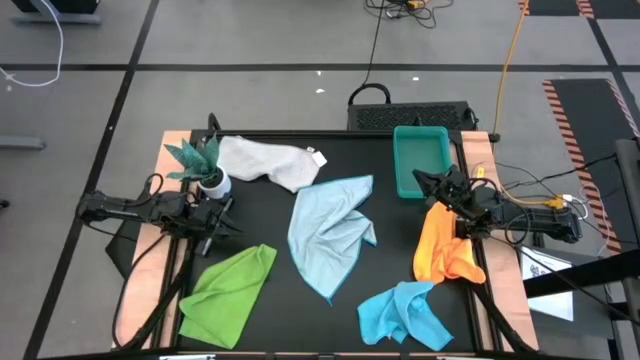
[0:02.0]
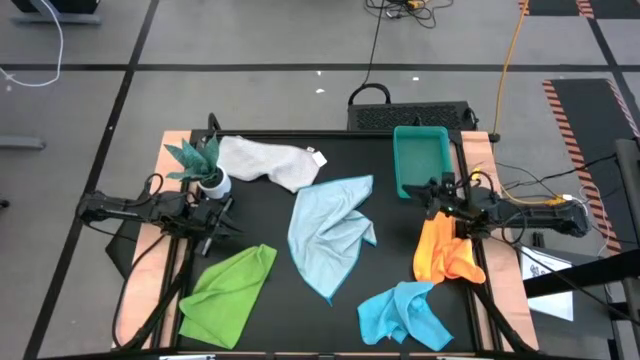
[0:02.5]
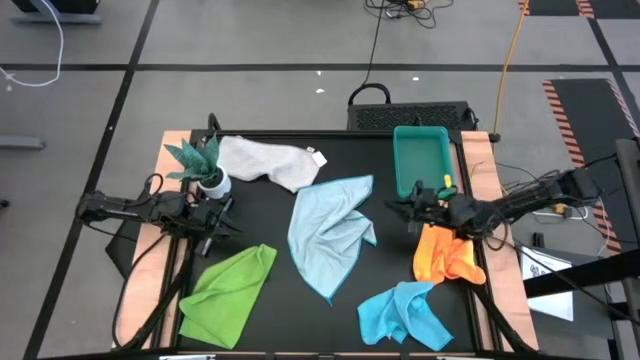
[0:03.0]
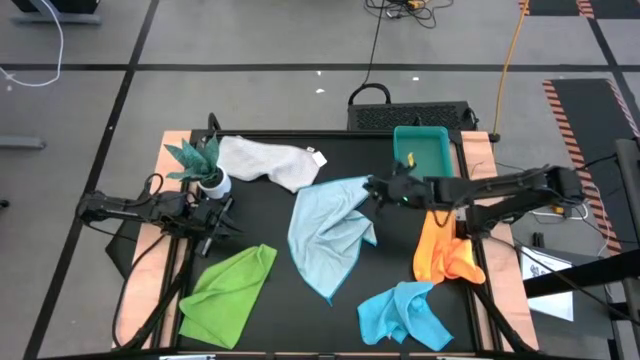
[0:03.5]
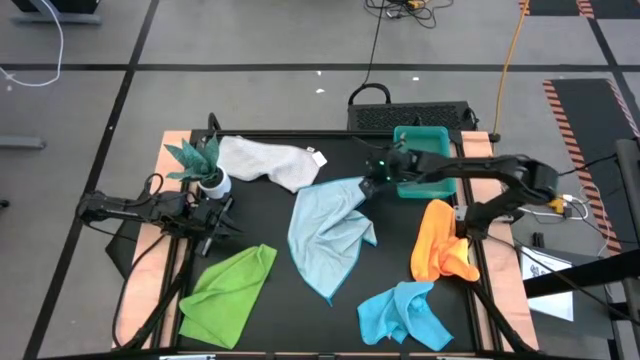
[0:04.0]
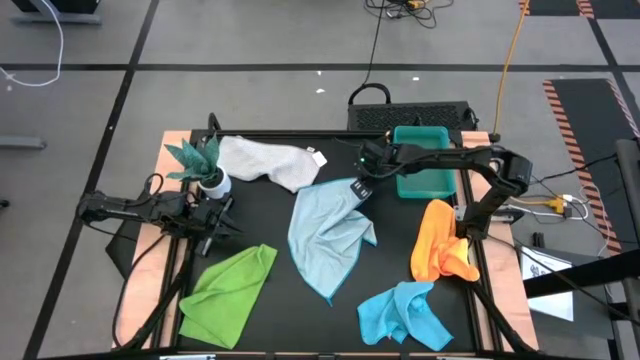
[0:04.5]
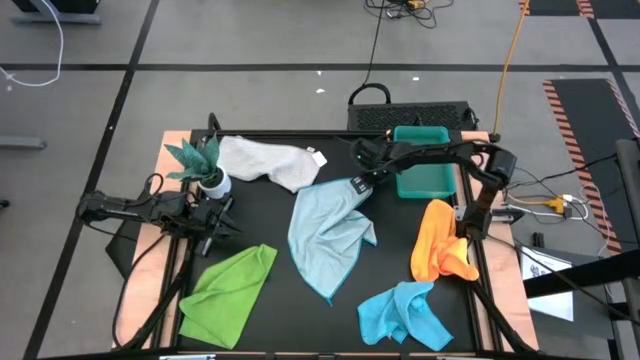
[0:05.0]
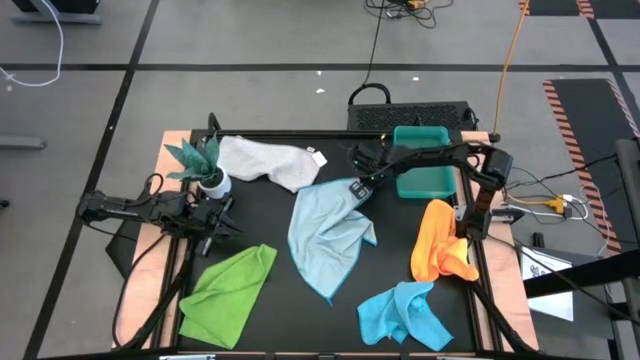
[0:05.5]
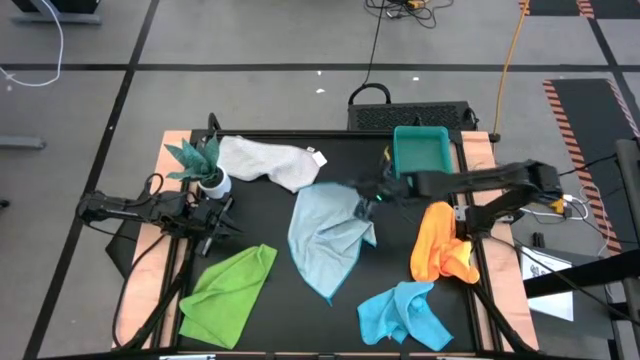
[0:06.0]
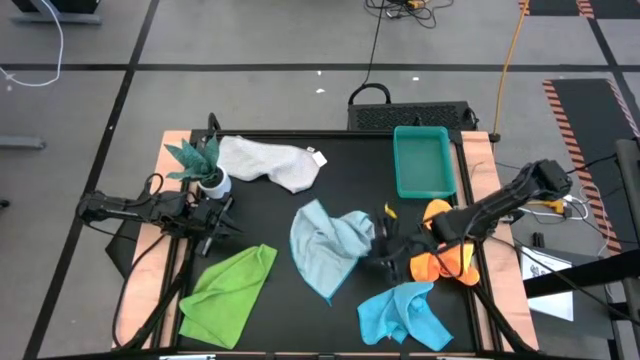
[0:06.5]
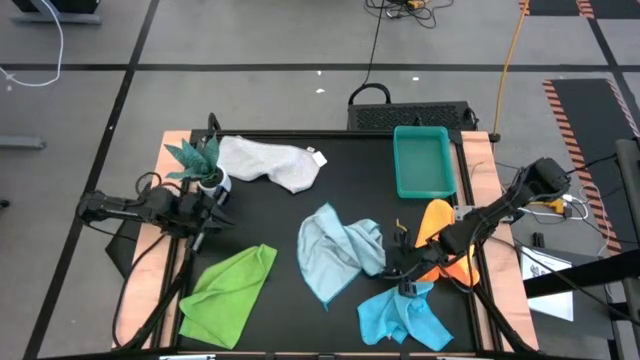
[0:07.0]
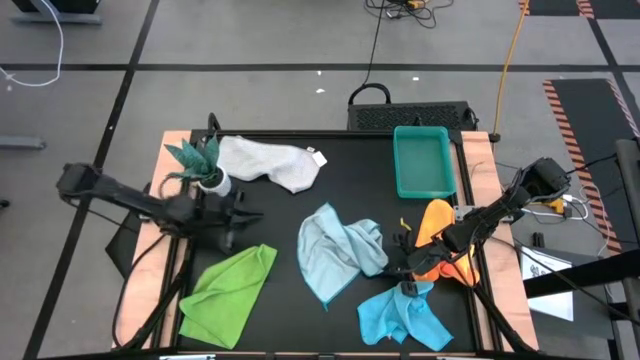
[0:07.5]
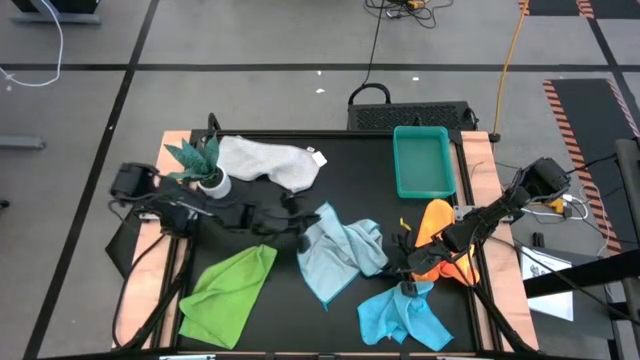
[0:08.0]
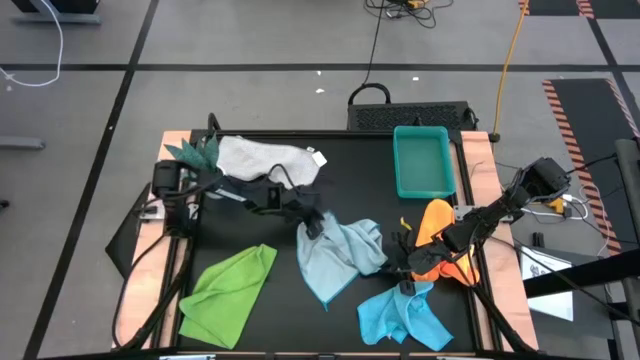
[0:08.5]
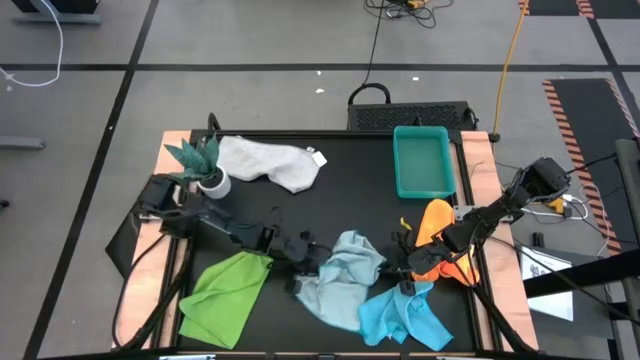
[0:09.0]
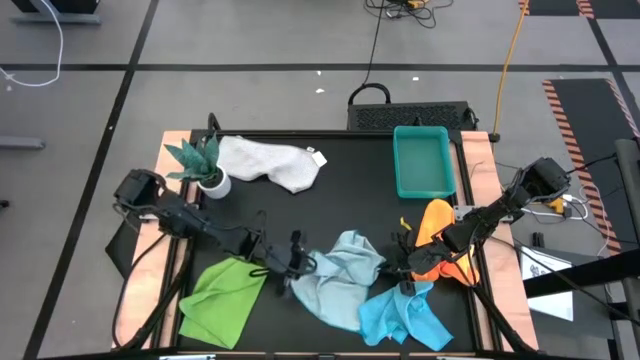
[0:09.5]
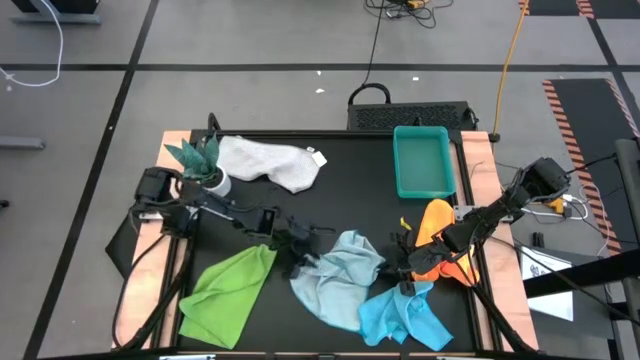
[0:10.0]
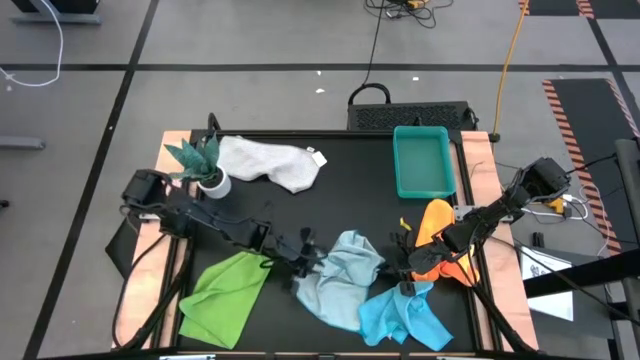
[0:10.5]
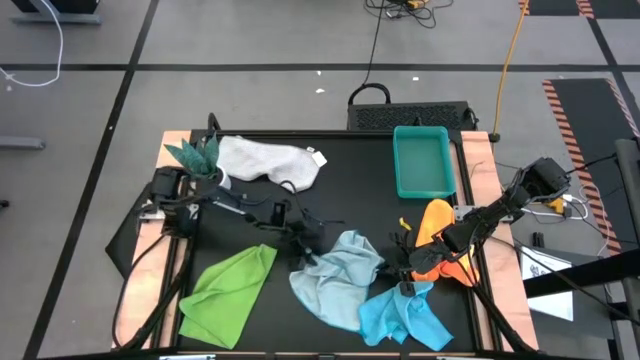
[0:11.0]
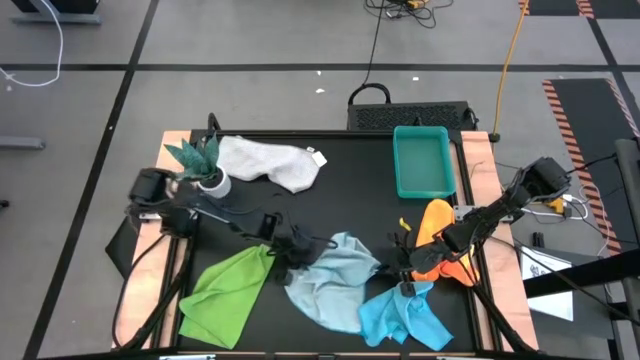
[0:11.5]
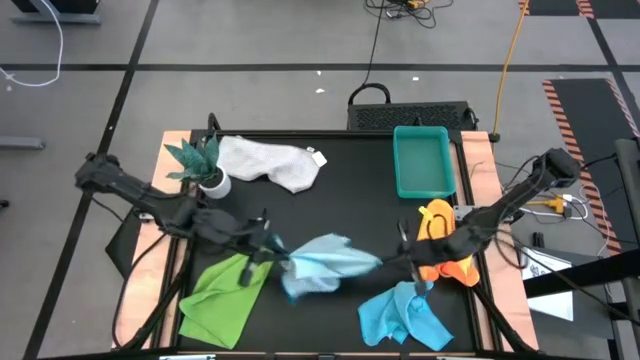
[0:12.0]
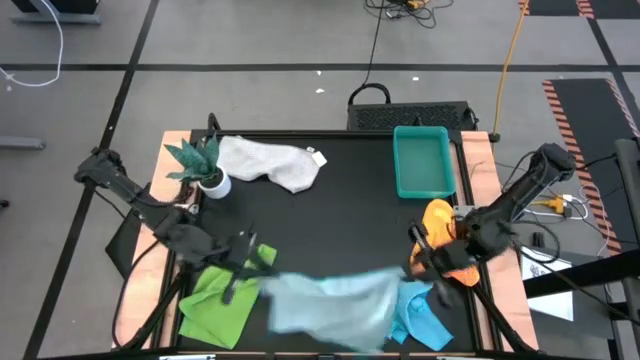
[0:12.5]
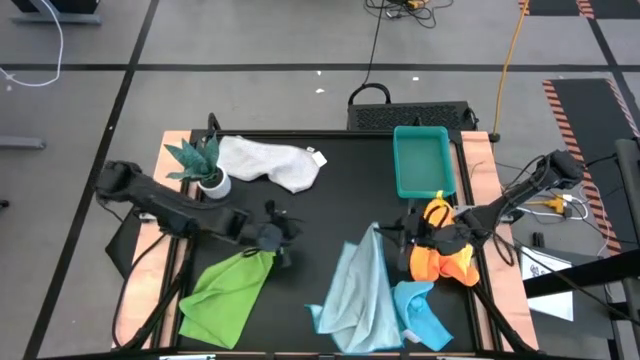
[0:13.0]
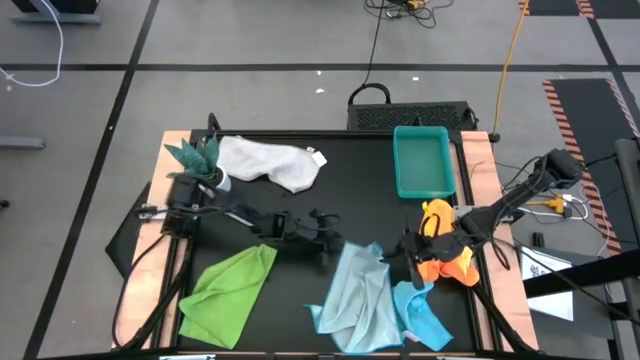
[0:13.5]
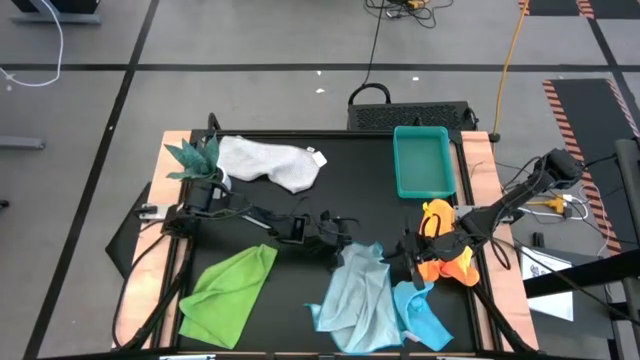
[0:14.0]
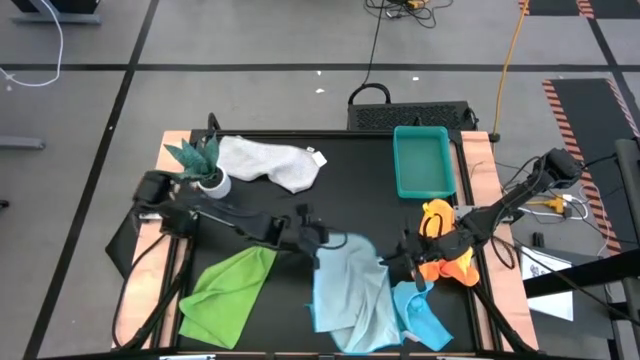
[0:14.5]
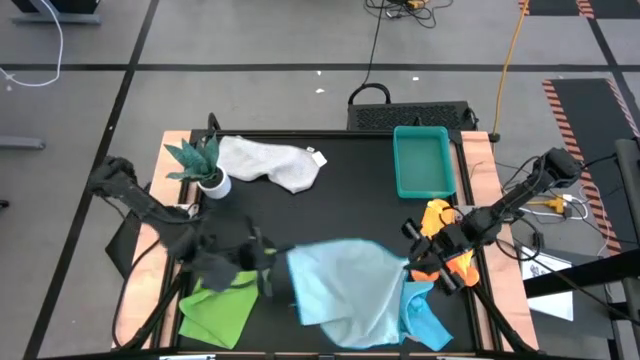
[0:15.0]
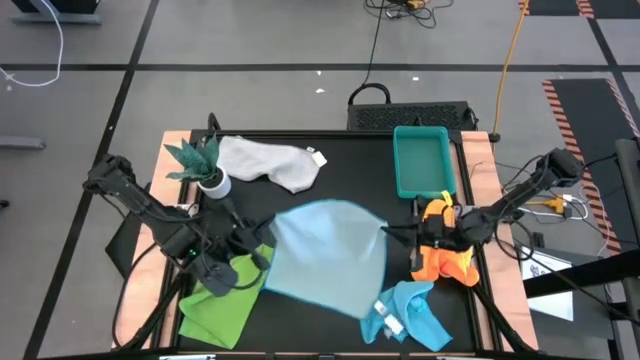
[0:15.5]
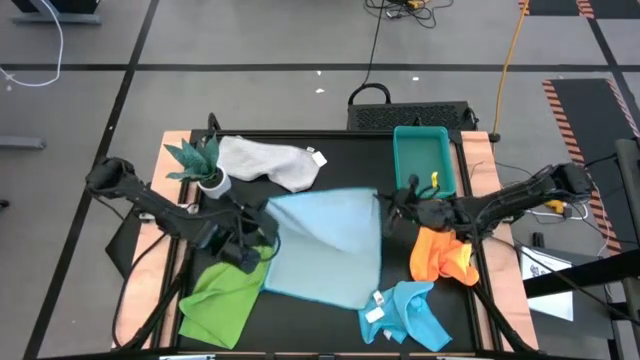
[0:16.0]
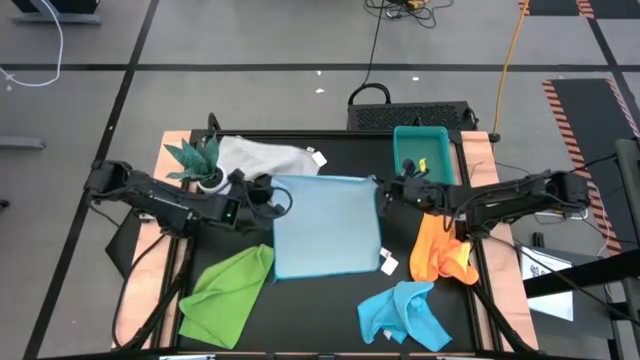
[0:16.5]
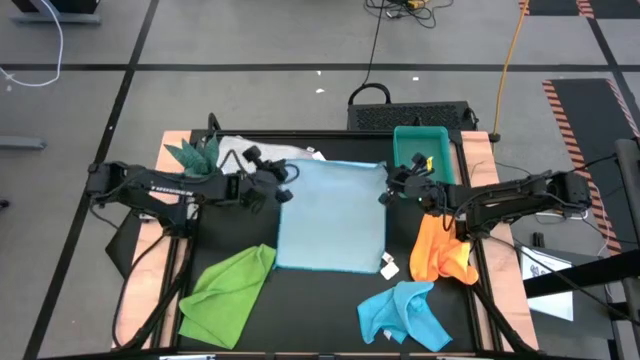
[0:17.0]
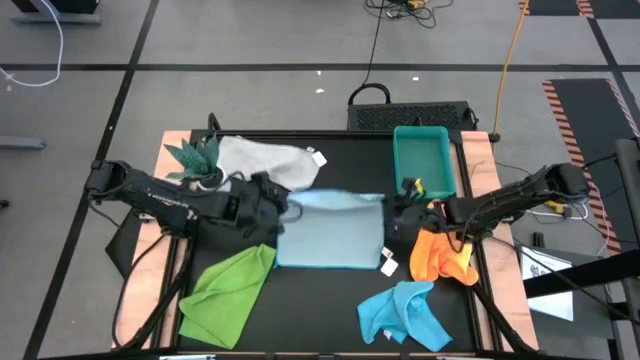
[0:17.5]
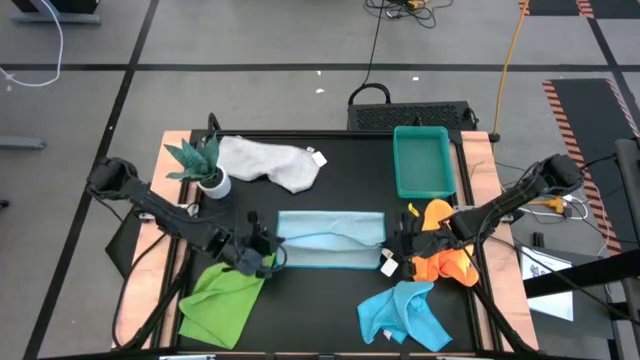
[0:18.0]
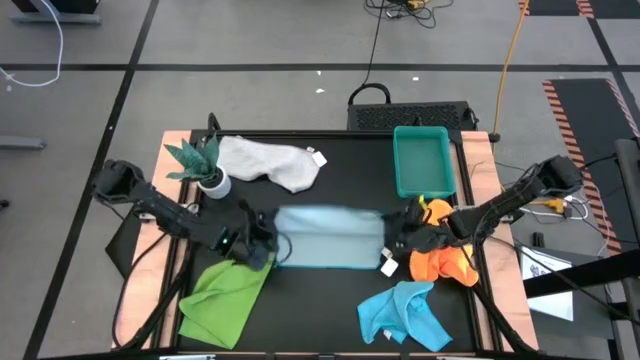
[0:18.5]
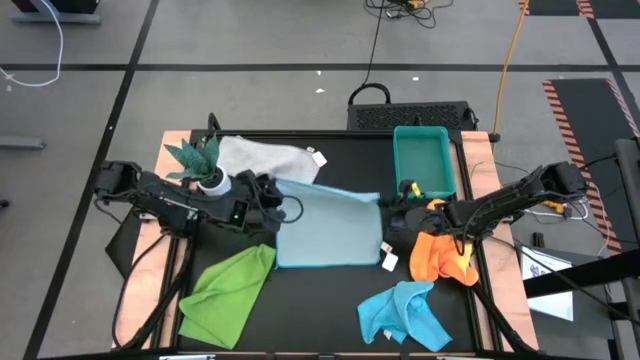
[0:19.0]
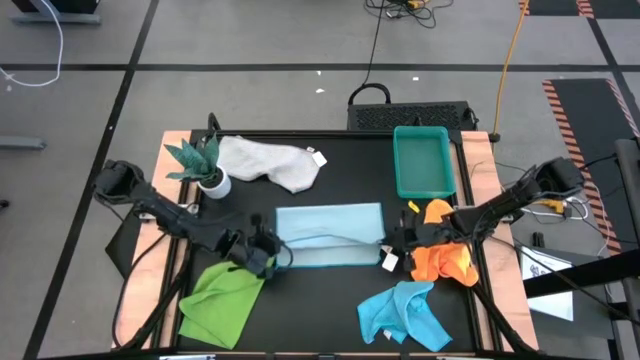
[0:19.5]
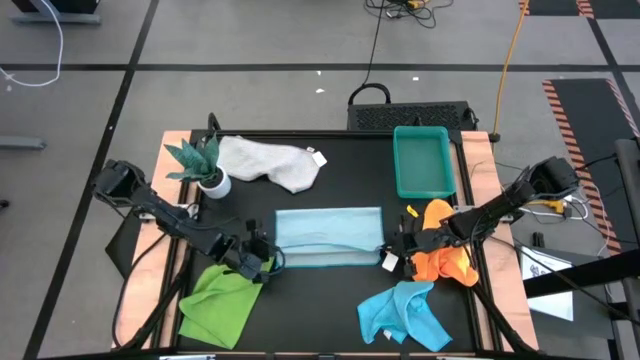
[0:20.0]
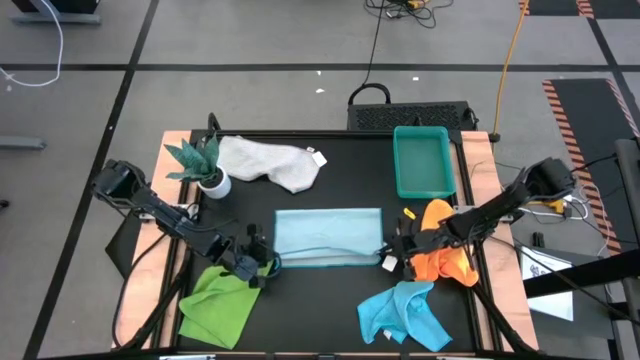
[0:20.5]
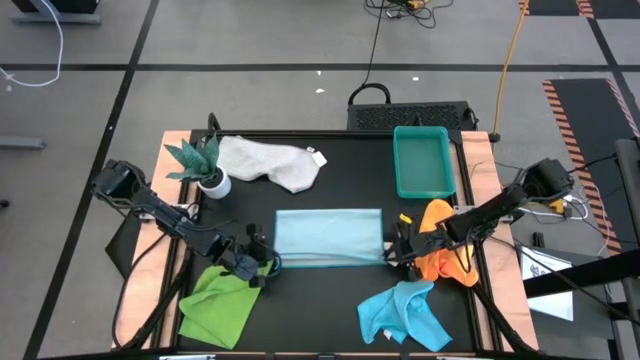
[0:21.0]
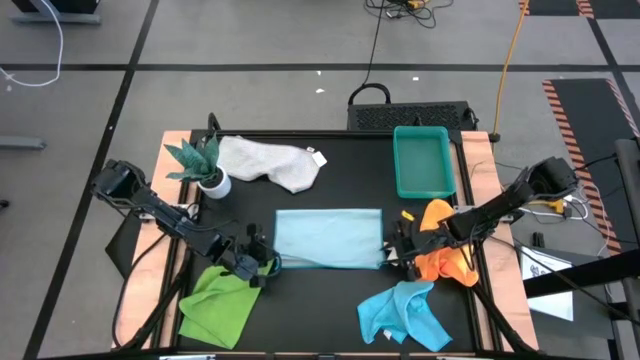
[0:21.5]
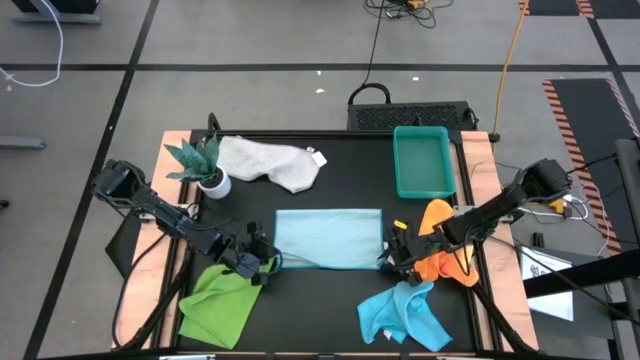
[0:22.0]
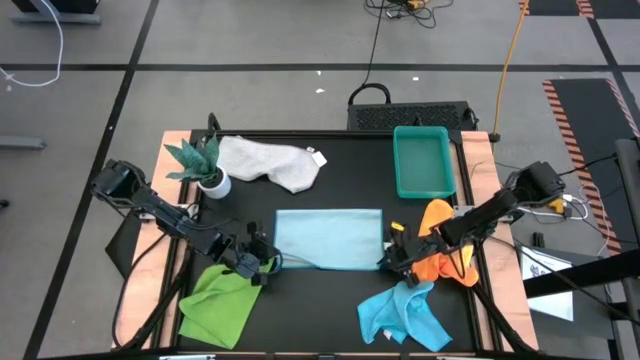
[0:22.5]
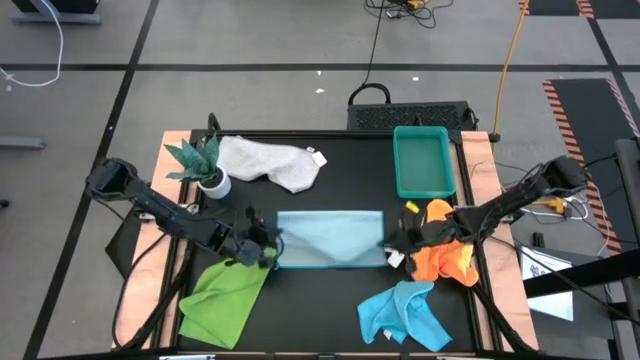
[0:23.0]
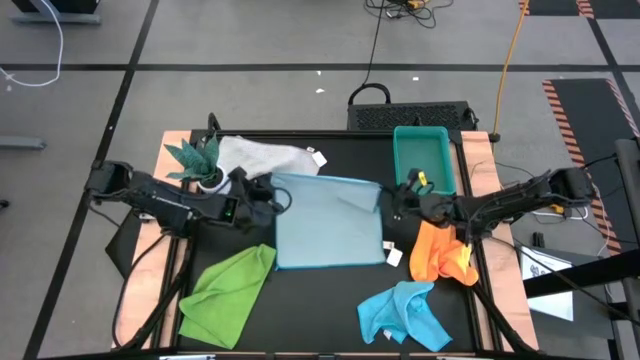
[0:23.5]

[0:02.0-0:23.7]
Task: Fold microfiber towels
Fold the light blue microfiber cloth
